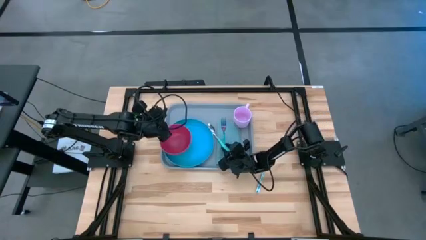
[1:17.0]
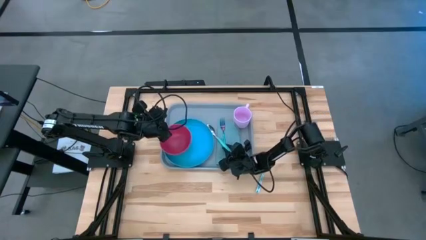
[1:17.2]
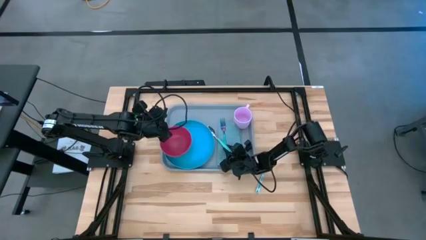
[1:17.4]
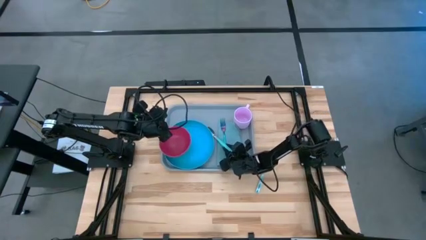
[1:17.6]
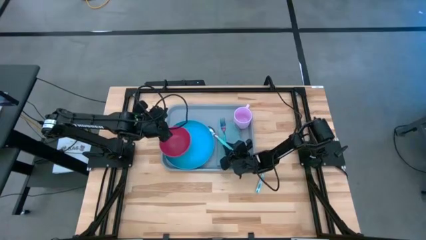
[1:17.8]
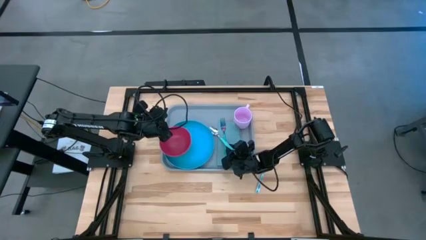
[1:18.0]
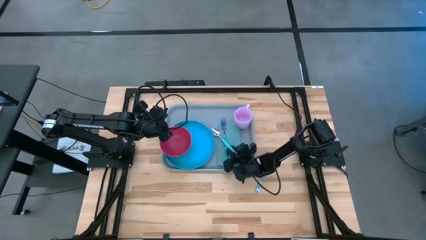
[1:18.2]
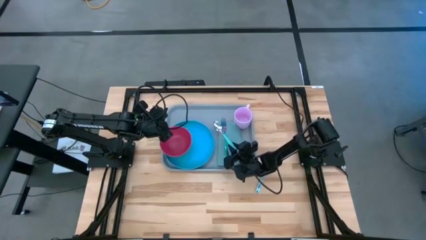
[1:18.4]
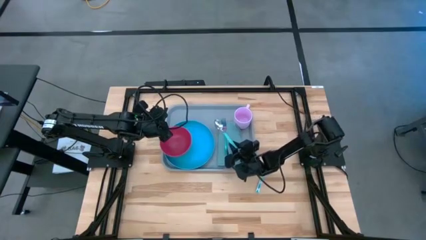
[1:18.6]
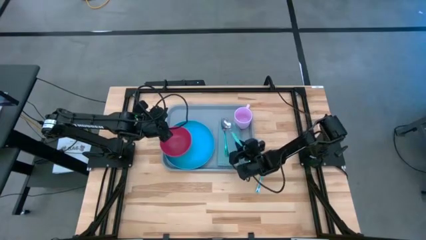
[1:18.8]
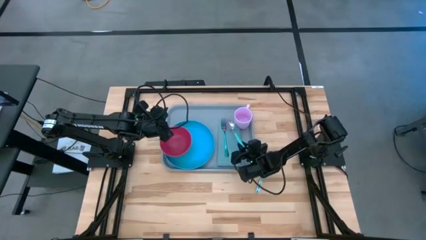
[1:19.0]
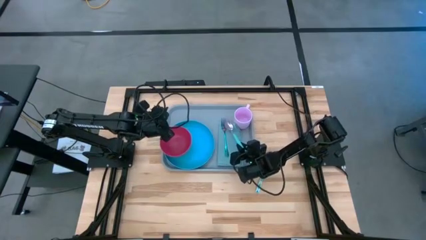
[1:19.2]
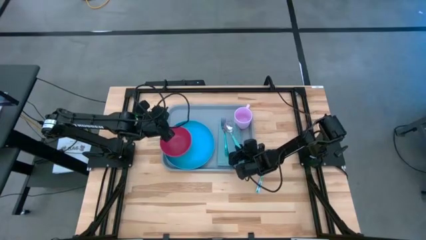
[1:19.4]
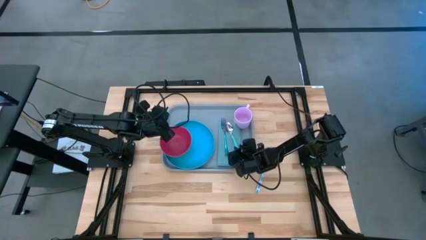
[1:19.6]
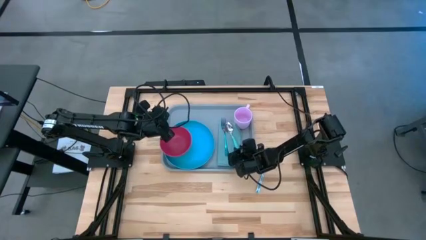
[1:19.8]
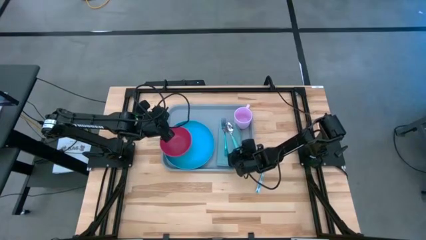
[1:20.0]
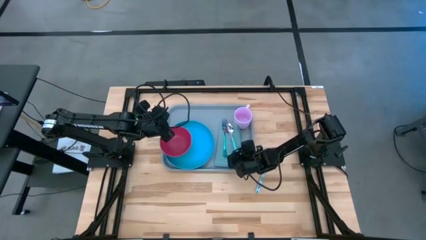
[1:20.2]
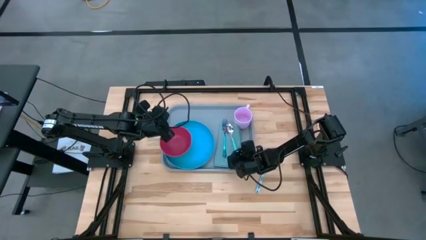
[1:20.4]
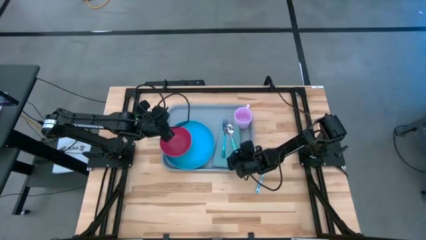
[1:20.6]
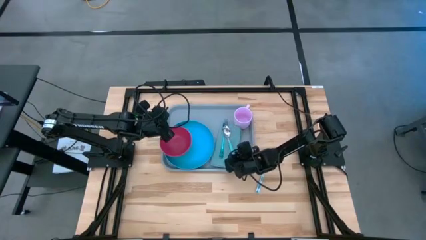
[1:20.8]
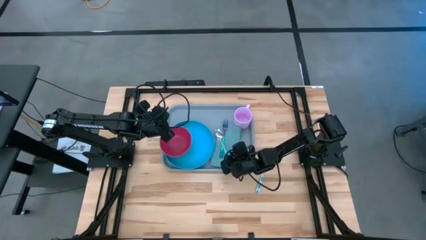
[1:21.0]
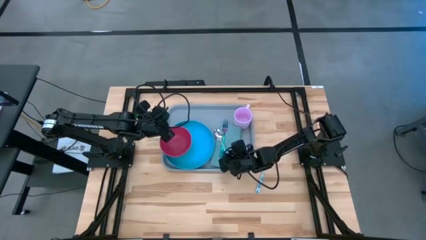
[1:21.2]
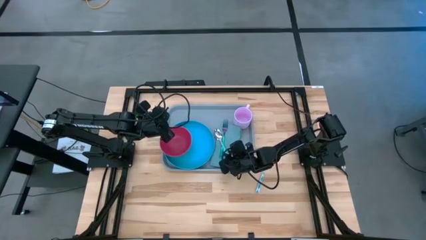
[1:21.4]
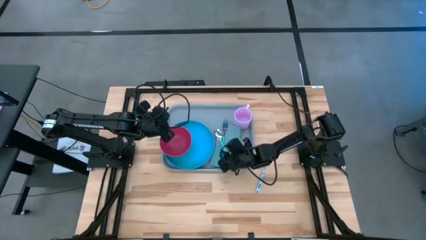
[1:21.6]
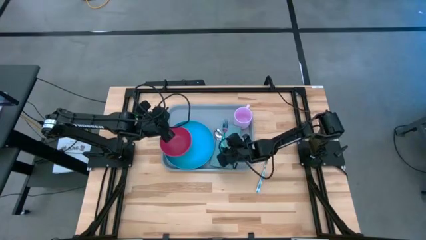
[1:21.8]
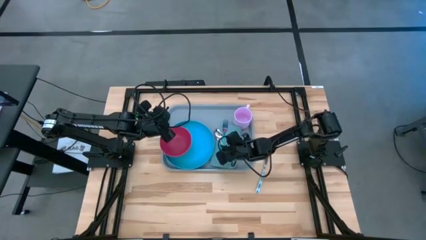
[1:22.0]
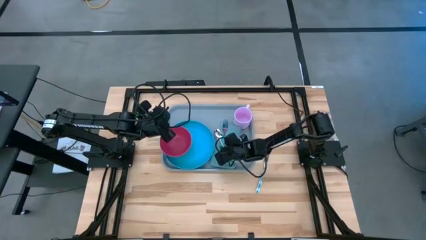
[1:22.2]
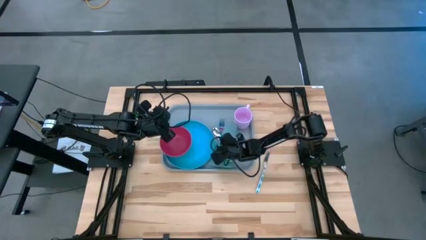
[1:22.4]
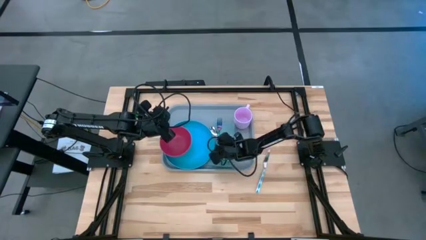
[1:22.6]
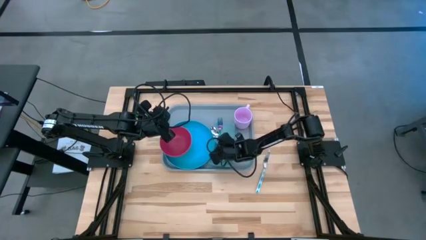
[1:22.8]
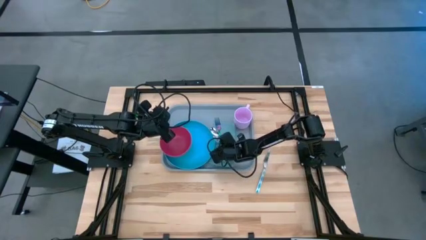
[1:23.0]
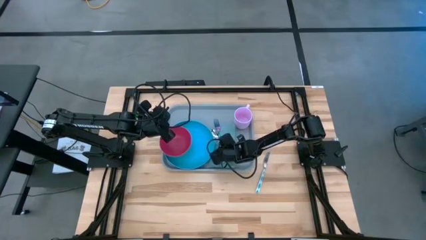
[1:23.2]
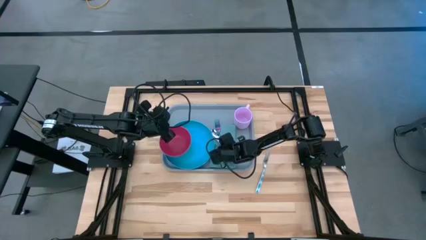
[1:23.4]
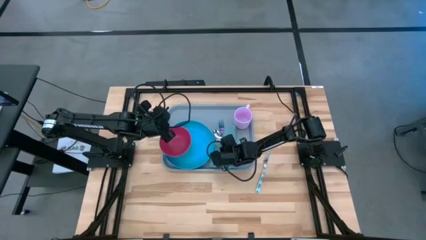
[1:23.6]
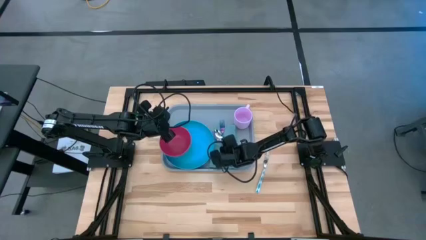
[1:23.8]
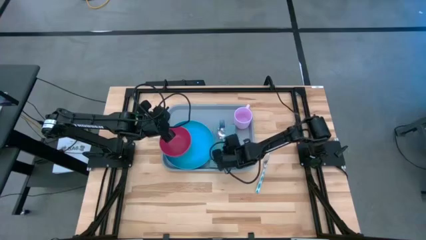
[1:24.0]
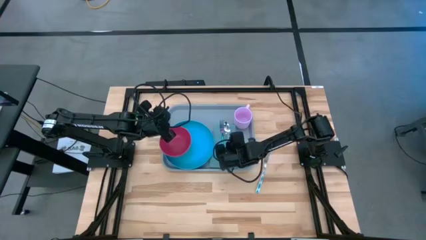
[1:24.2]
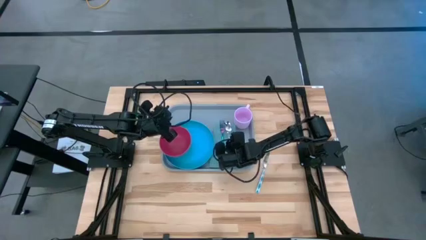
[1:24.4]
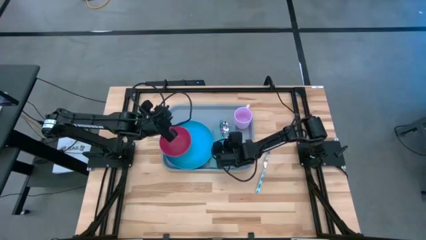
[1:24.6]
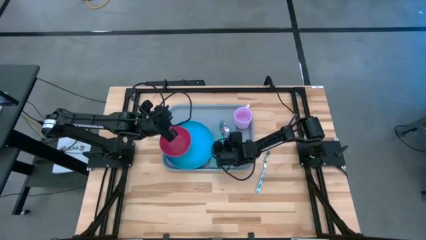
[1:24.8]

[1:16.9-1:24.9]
Task: Set up tray
Put the blue spoon on the napkin to the right of the purple fork

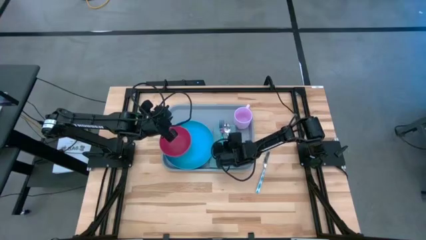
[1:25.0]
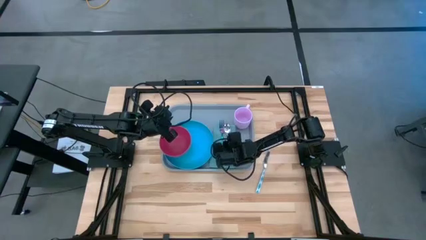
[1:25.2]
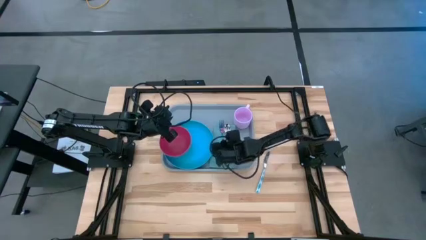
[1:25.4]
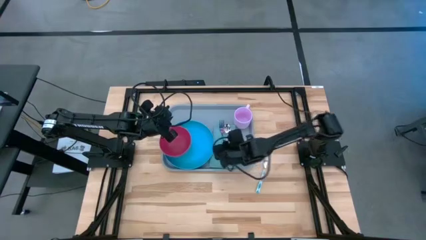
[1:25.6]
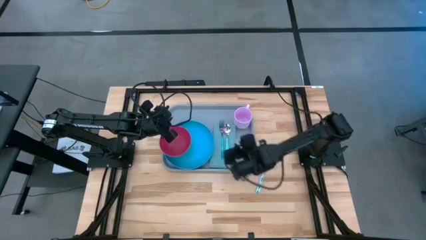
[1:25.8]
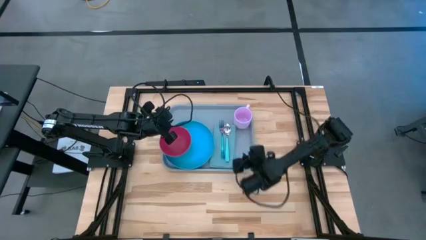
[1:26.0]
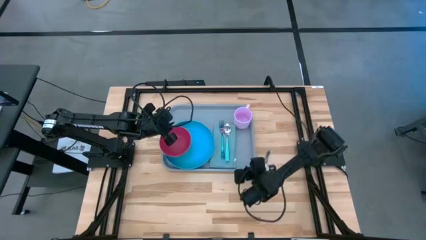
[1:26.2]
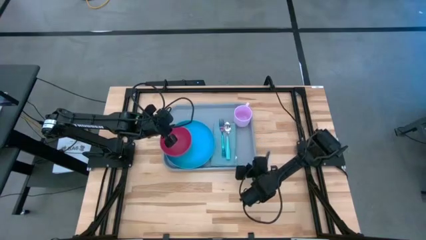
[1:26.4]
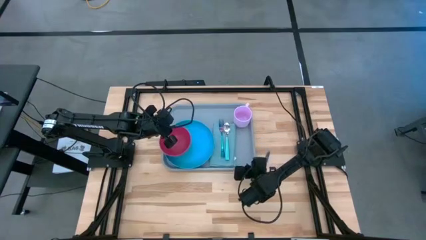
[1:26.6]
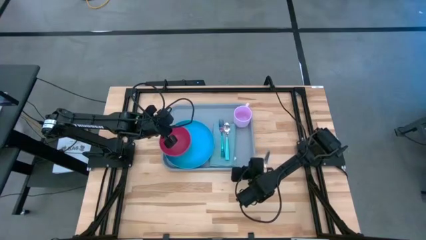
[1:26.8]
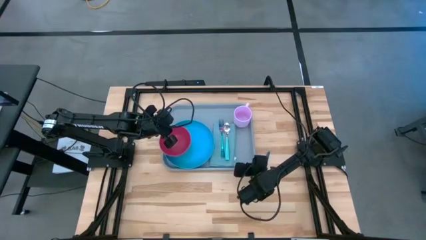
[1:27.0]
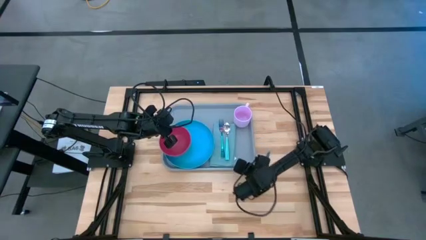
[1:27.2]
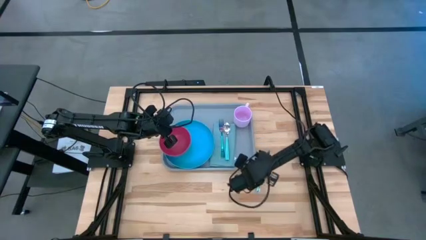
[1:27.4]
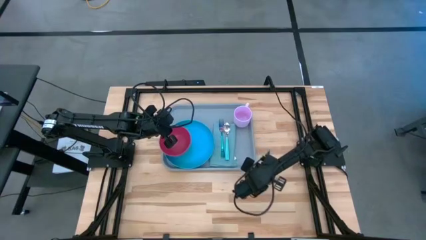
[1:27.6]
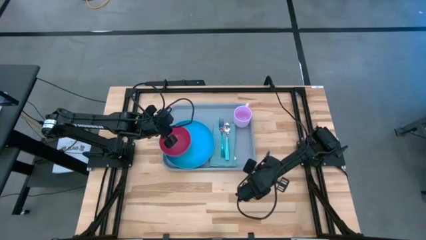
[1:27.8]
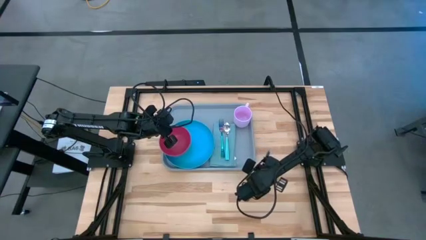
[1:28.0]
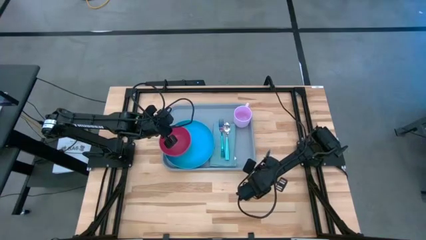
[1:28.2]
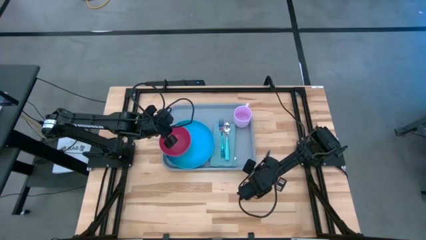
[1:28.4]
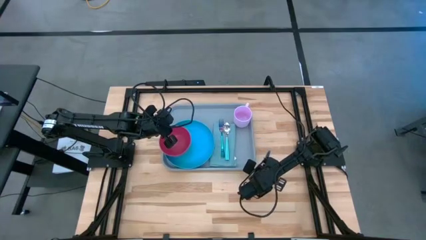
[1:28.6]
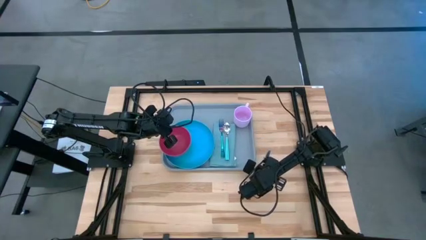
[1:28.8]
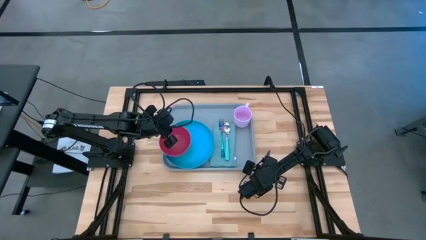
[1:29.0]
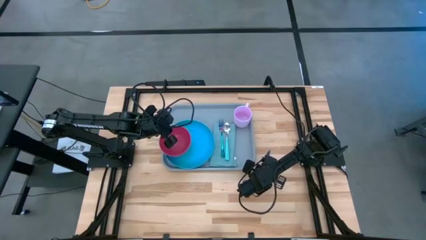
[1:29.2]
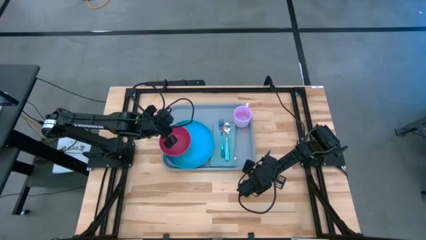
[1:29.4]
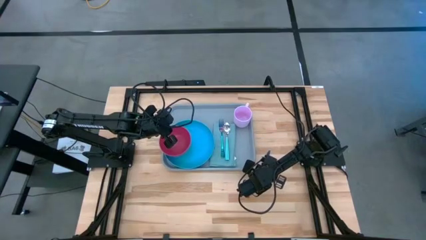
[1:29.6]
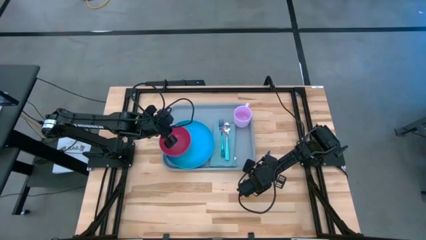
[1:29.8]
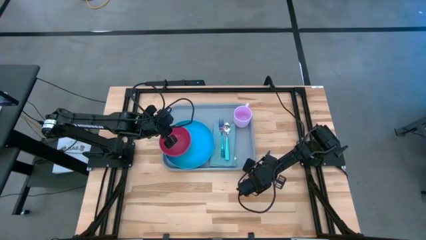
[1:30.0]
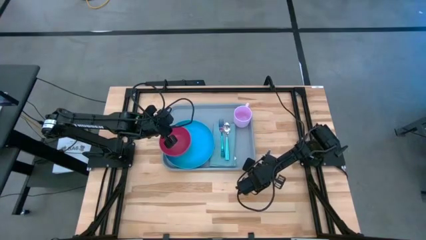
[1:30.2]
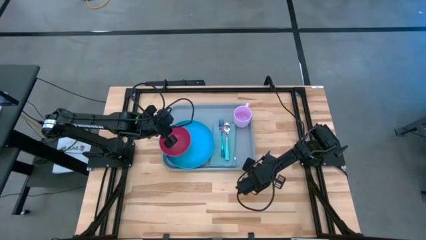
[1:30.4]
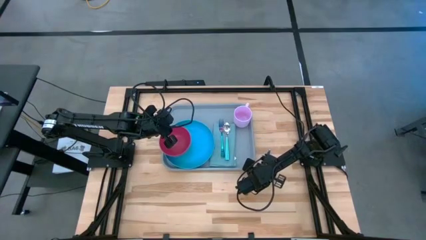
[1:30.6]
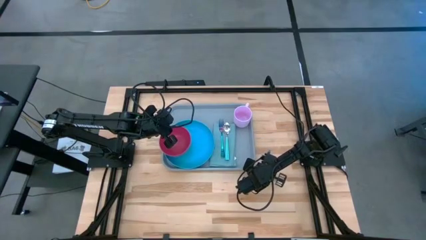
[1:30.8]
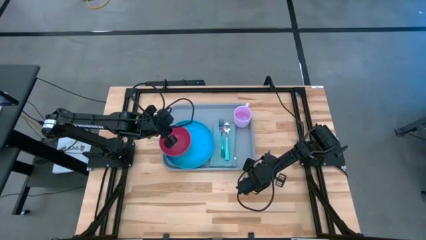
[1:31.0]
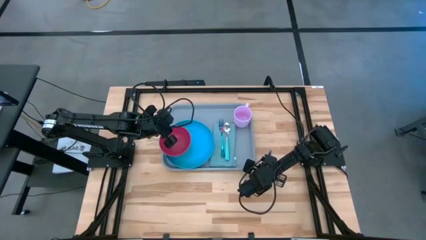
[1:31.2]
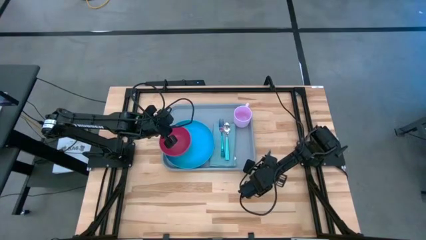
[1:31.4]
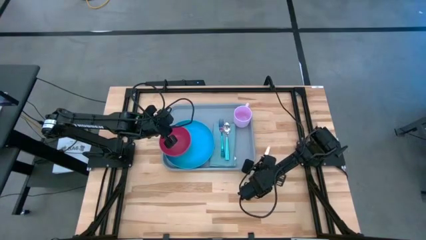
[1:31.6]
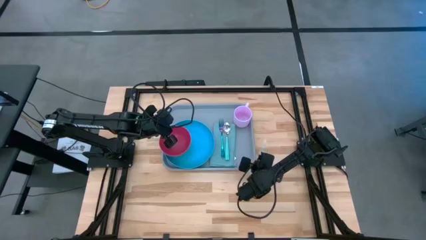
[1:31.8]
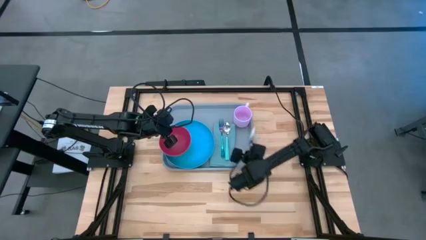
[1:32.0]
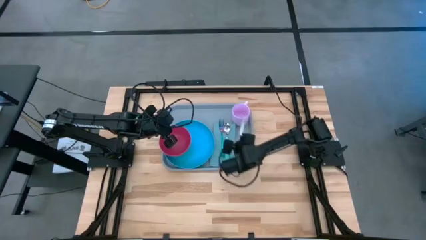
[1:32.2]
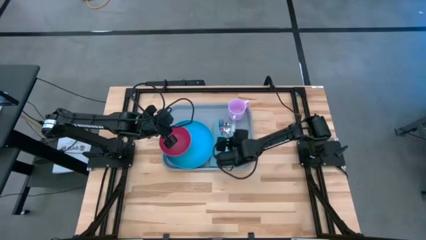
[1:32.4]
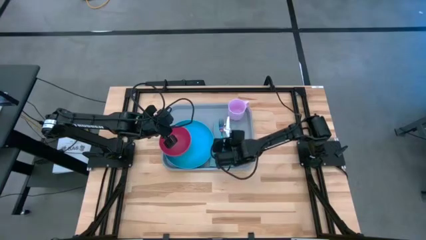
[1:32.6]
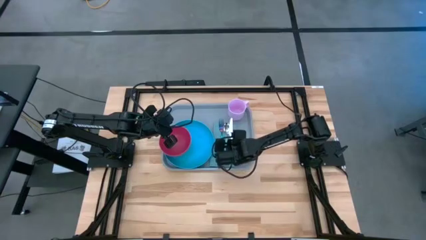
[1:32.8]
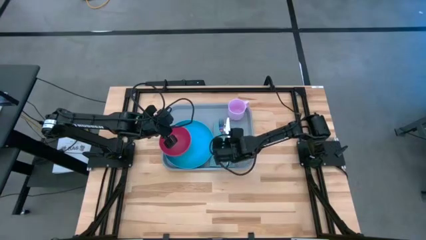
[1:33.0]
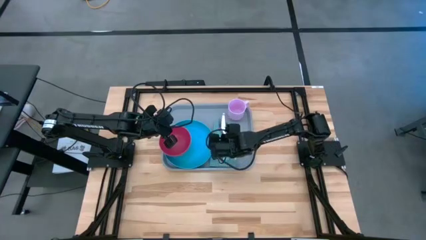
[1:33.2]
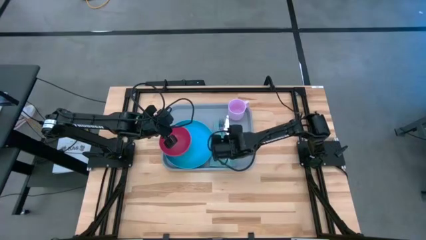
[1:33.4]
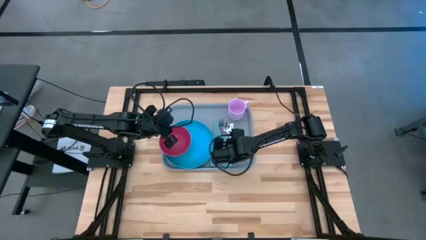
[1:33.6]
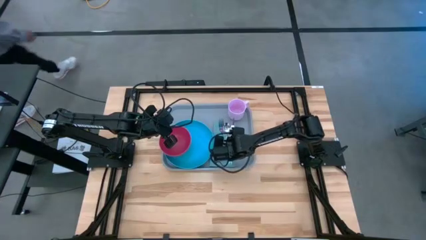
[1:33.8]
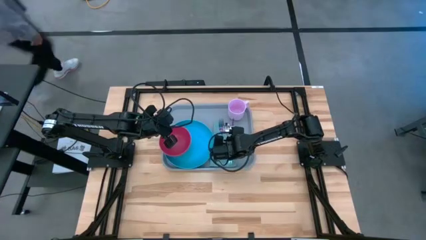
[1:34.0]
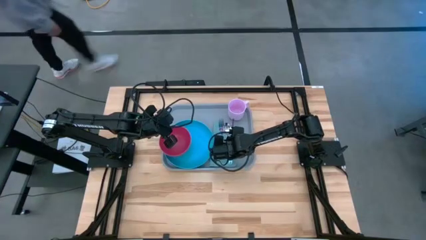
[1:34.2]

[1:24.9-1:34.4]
Put the blue patterned knife on the napkin to the right of the blue spoon
